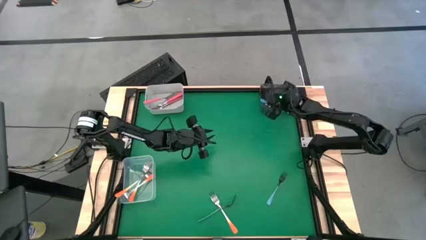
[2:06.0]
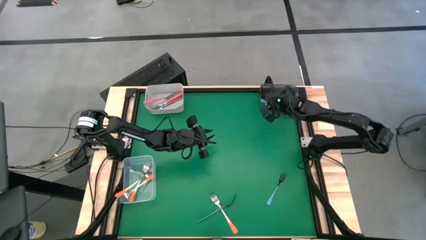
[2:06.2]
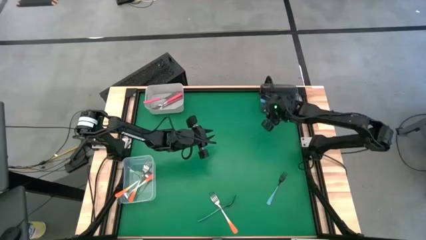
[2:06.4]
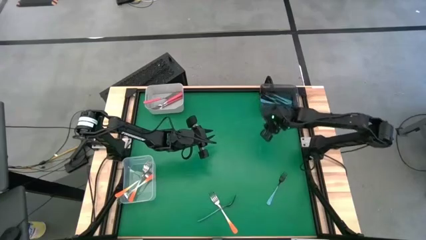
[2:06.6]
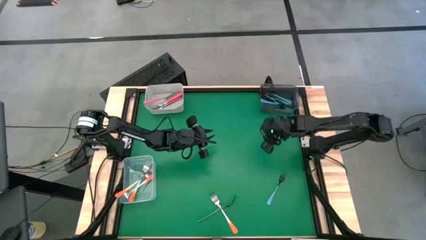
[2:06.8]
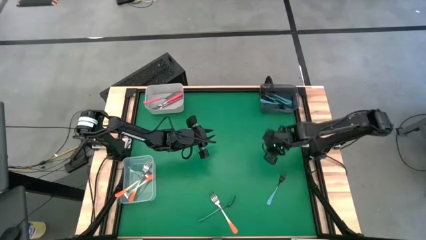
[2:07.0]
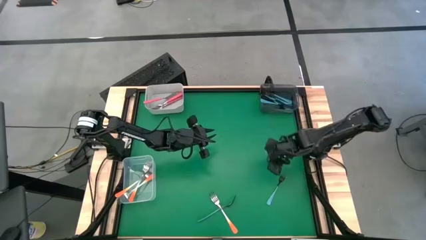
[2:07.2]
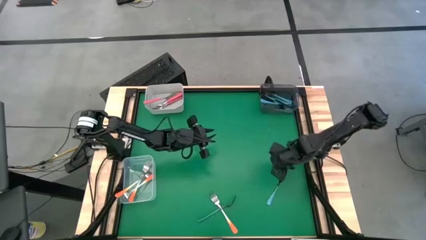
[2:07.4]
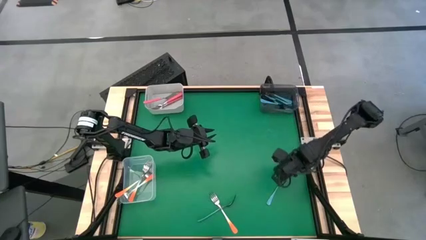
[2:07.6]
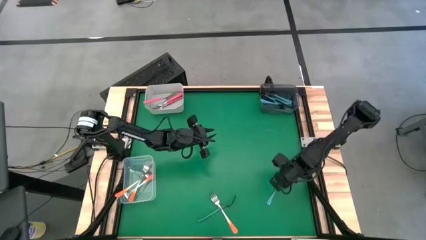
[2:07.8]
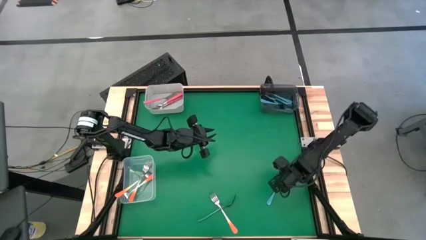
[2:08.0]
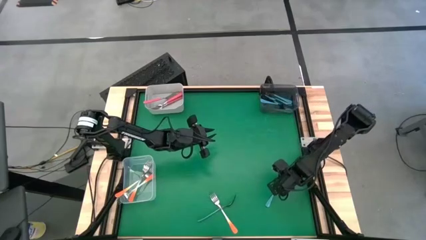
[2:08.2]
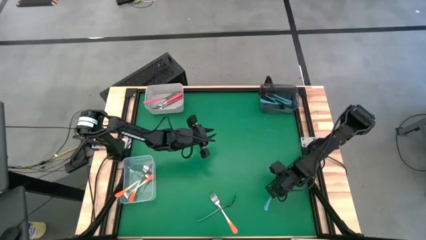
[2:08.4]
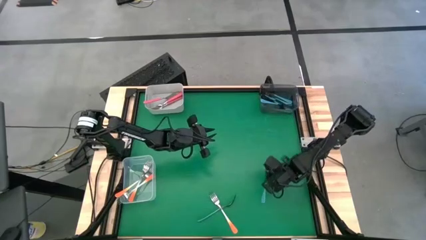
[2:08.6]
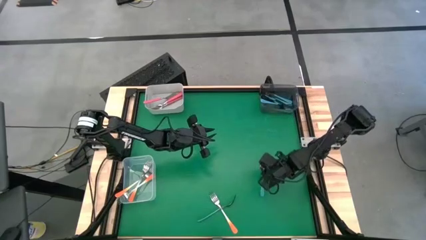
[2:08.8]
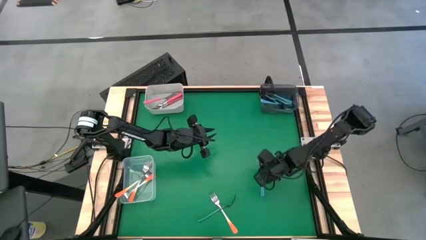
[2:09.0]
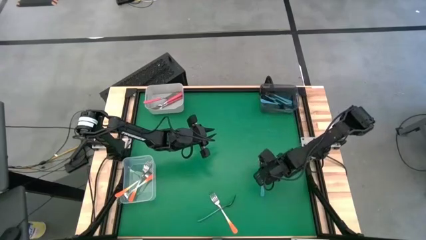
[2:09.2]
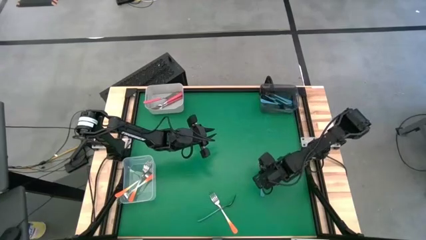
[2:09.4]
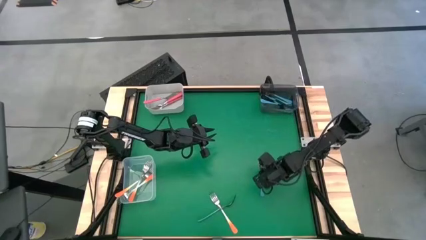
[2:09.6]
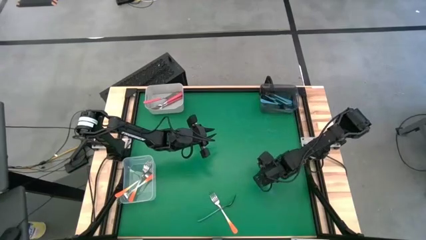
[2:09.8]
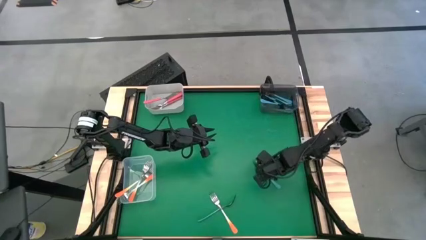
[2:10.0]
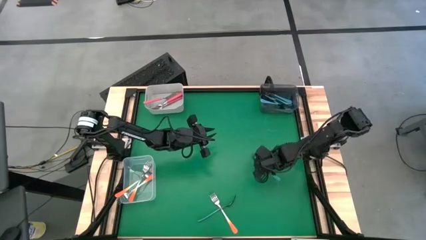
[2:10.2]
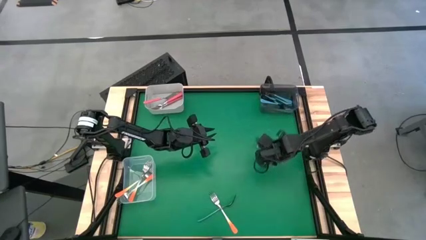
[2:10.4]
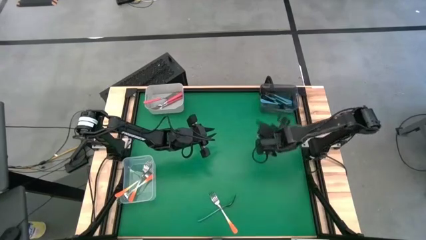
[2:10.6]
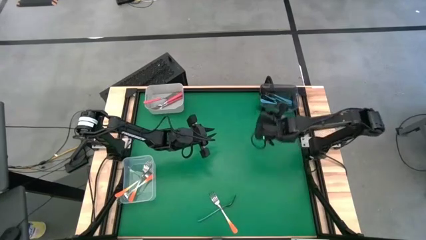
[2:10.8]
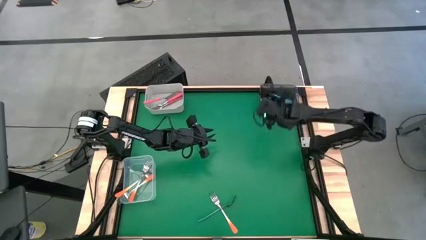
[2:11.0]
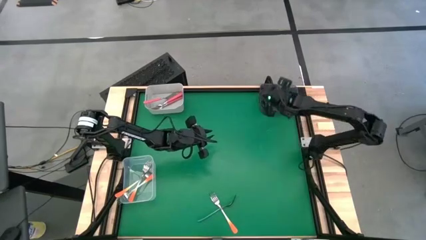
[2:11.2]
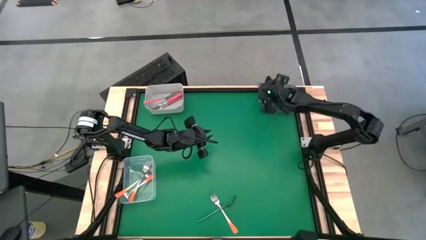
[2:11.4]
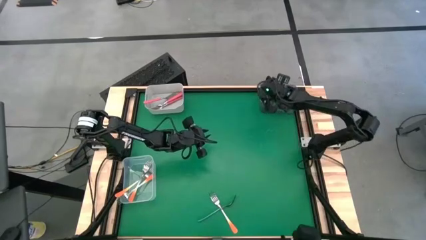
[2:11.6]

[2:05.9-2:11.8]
Task: Sort silverware by color (type)
Put the blue fork into the black bin

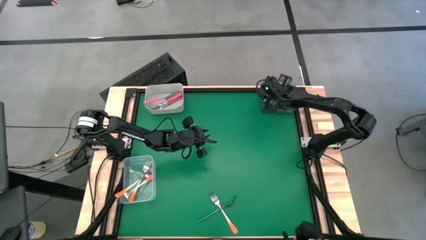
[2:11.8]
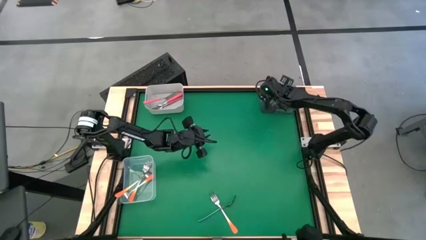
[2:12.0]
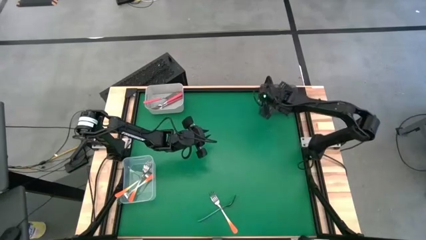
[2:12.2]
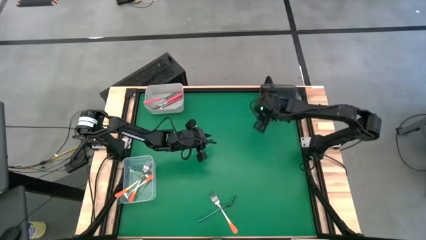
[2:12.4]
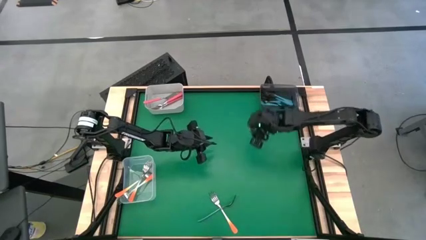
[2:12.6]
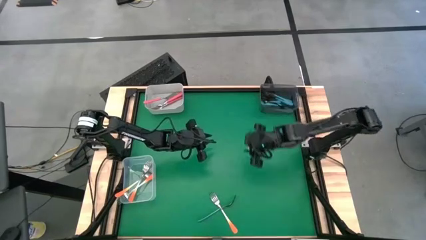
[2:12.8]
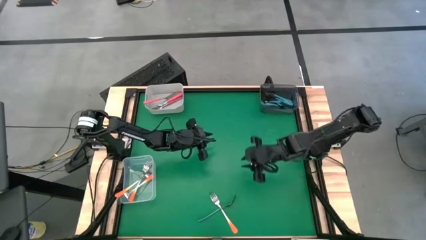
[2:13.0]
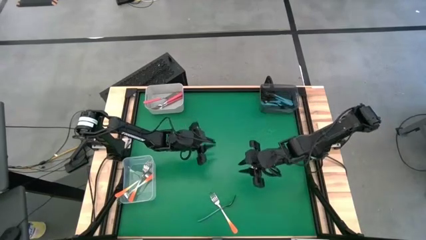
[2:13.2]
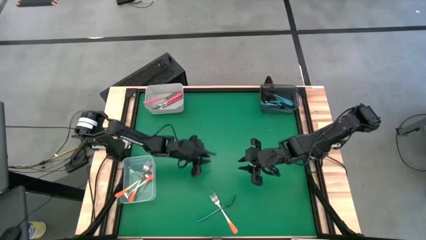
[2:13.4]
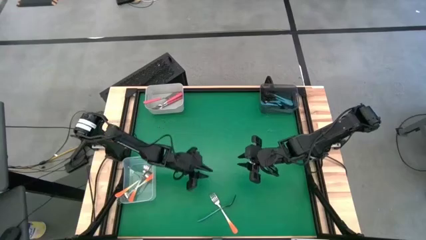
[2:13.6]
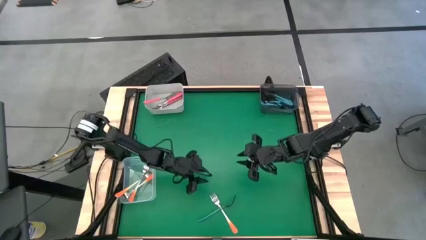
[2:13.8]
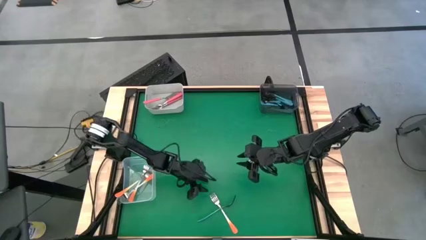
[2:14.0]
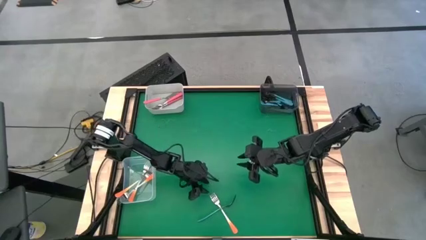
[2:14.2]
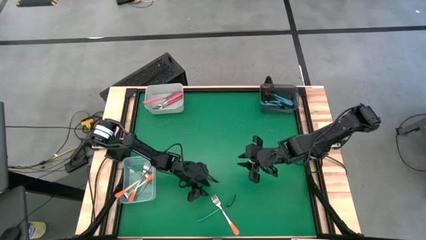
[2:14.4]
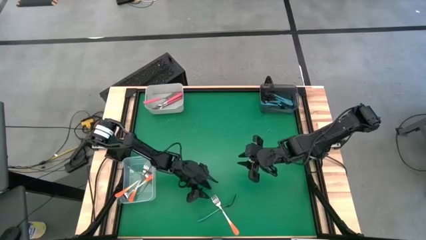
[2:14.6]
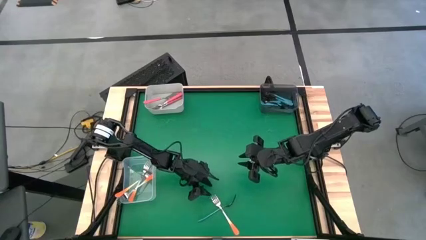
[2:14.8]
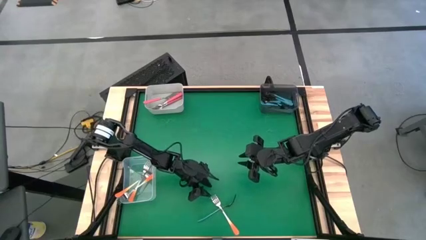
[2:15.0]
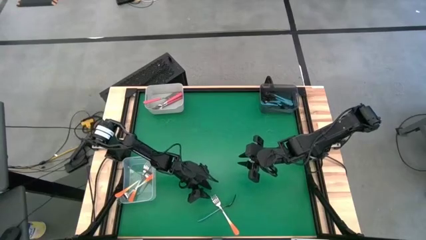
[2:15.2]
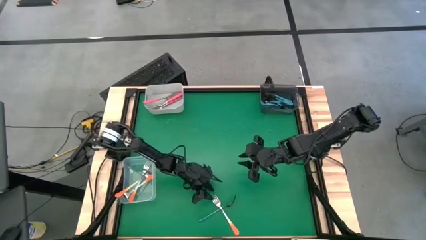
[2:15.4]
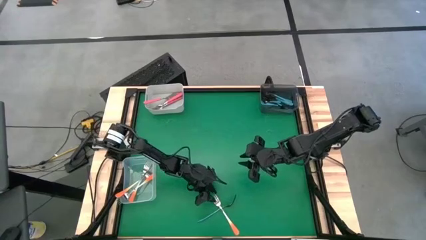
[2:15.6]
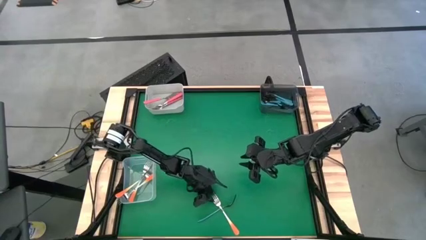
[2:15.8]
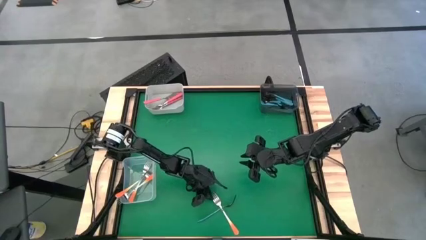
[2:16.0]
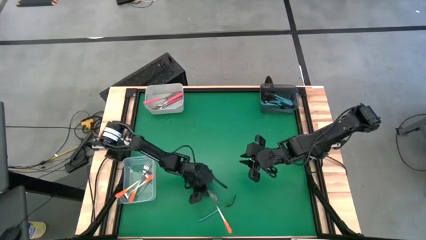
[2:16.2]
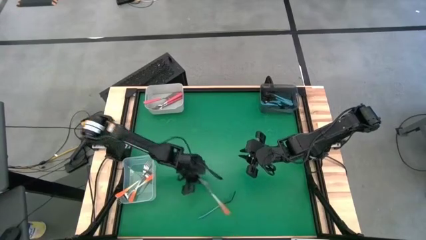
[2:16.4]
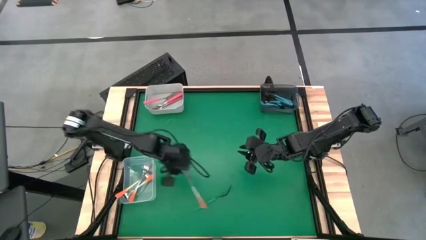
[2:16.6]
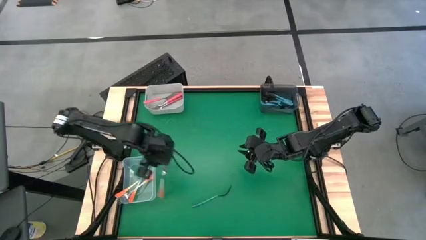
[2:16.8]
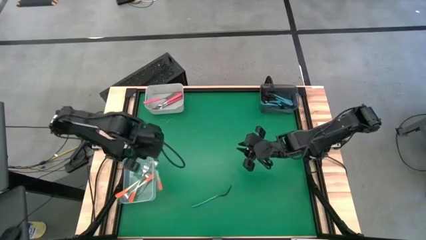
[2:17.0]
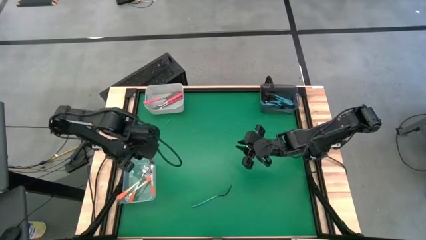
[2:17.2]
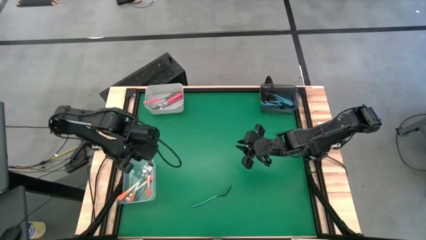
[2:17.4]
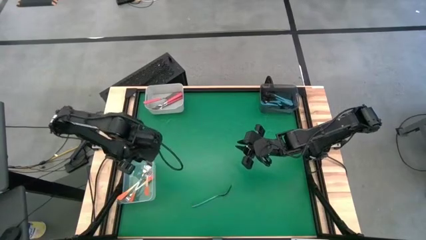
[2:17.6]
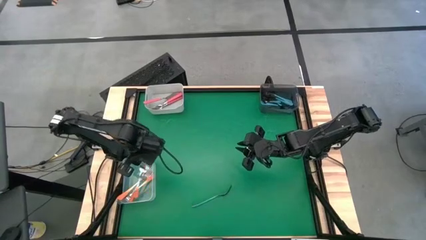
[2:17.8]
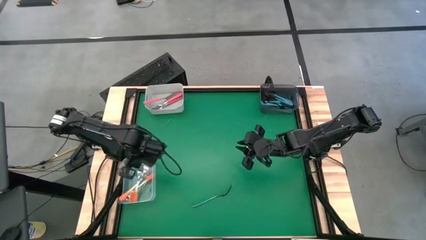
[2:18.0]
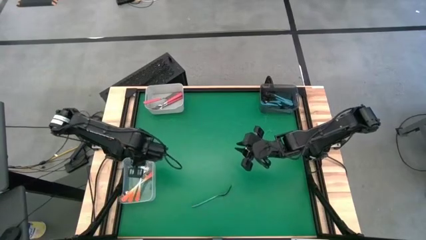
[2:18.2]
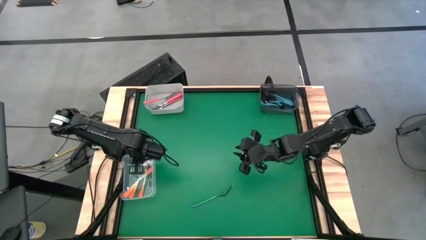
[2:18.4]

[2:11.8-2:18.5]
Put the orange fork into the transparent bin

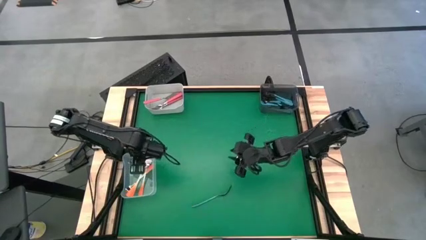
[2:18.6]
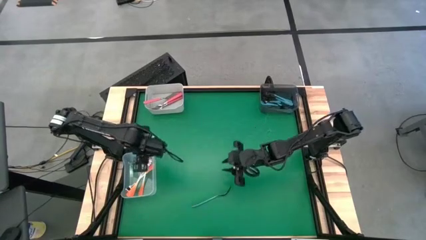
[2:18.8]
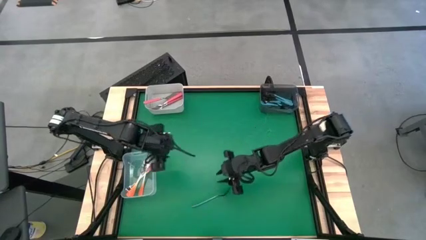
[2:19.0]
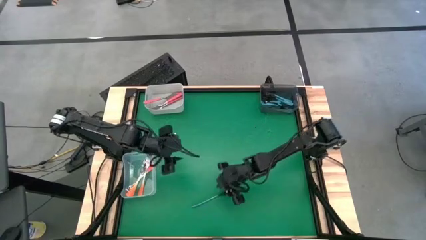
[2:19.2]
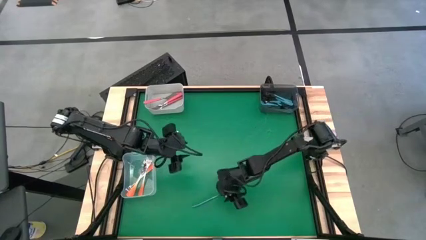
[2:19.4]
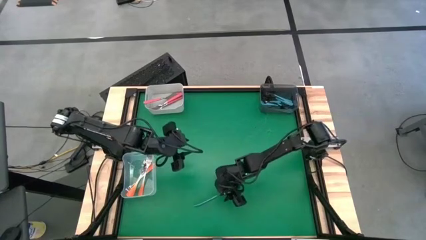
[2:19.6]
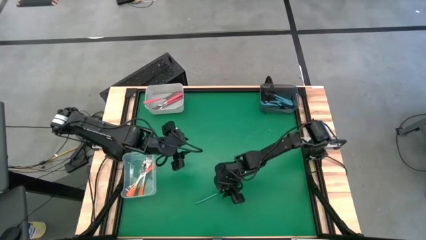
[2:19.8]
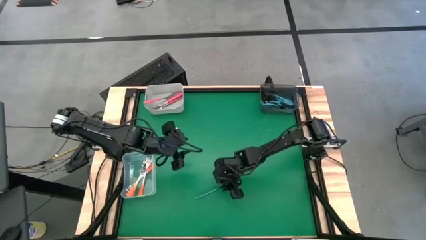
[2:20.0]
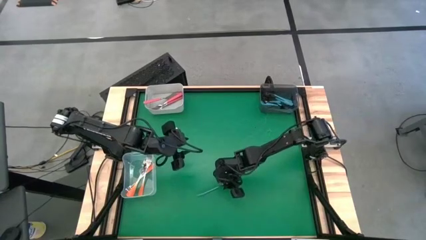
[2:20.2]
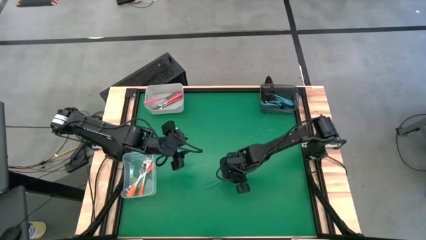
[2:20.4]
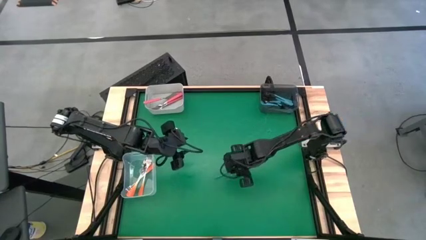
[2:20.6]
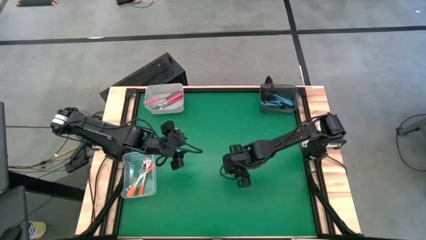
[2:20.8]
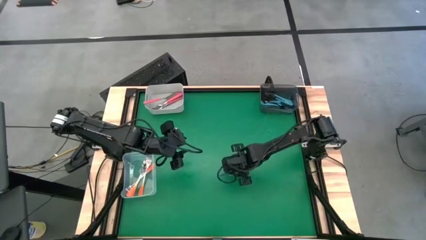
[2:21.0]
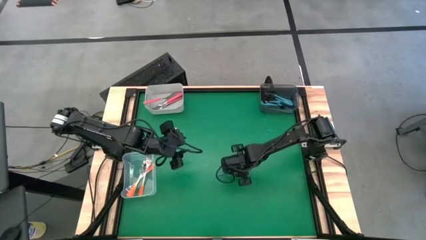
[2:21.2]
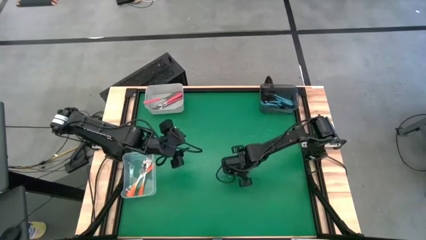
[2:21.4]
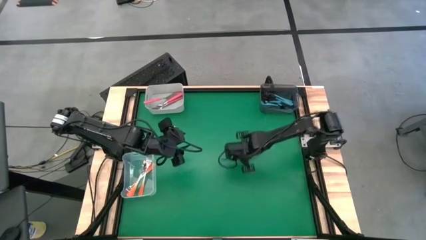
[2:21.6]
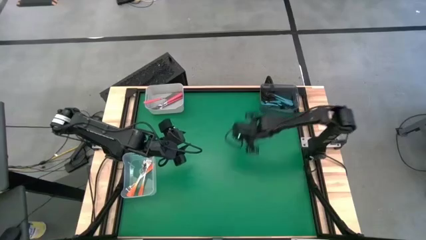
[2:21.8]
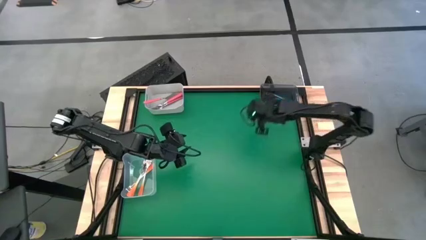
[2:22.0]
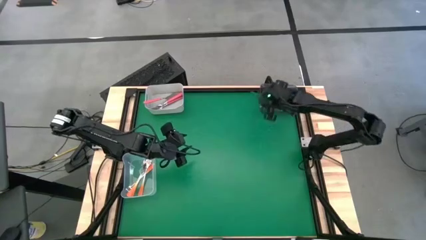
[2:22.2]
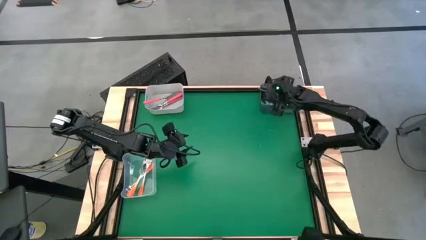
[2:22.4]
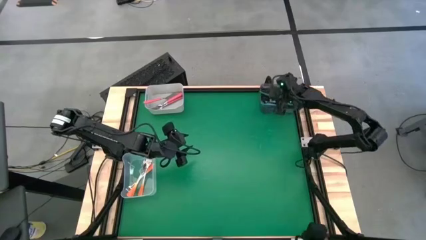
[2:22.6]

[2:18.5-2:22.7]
Put the blue fork into the black bin
